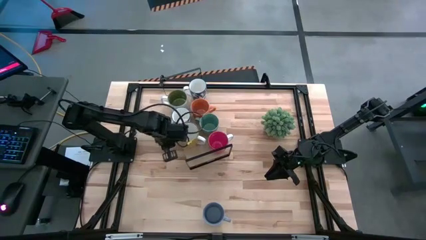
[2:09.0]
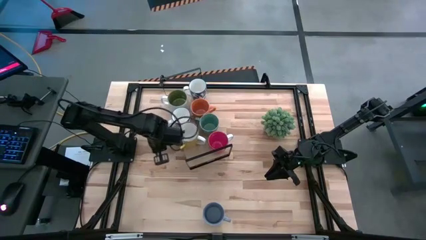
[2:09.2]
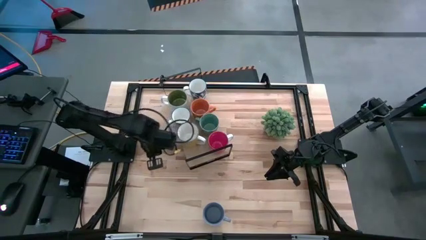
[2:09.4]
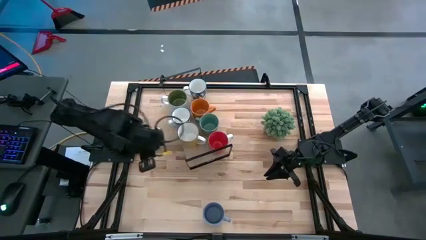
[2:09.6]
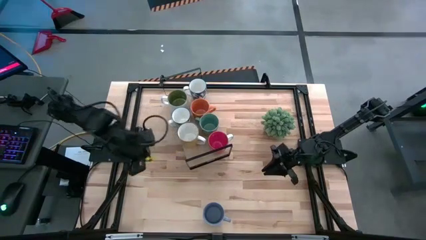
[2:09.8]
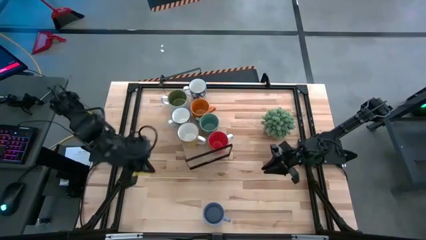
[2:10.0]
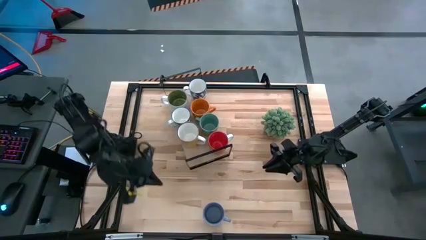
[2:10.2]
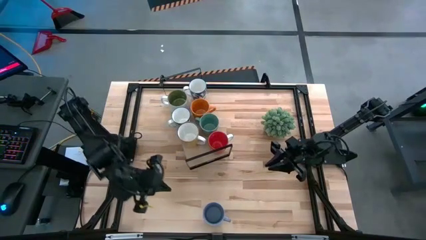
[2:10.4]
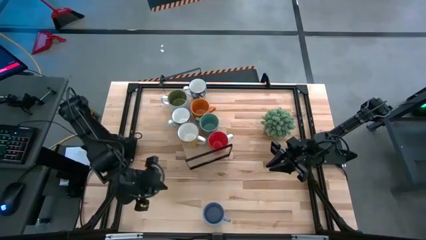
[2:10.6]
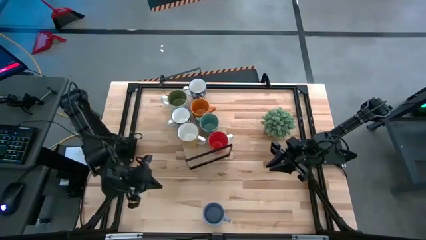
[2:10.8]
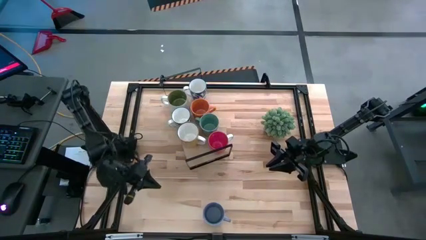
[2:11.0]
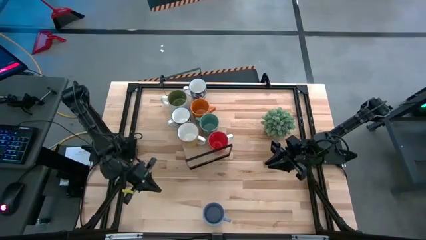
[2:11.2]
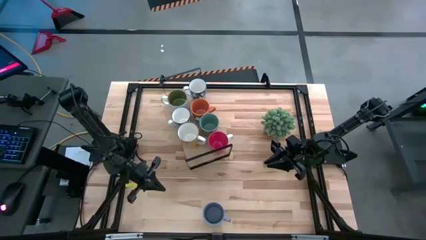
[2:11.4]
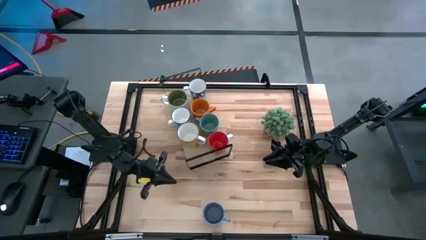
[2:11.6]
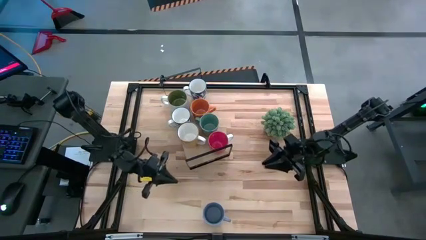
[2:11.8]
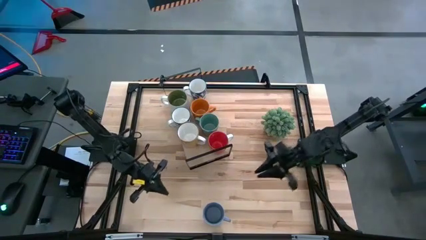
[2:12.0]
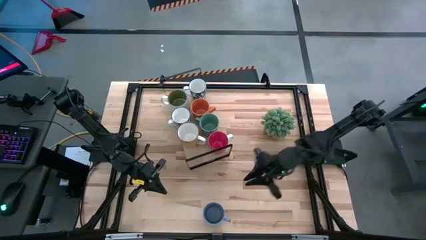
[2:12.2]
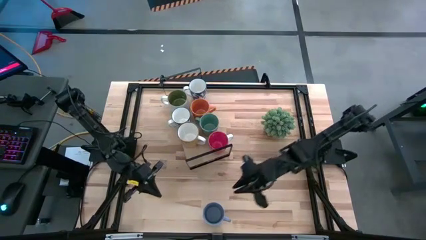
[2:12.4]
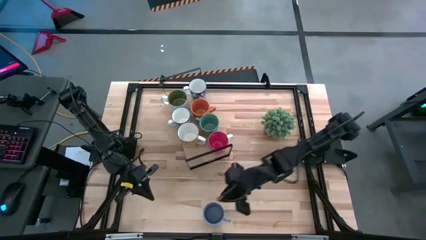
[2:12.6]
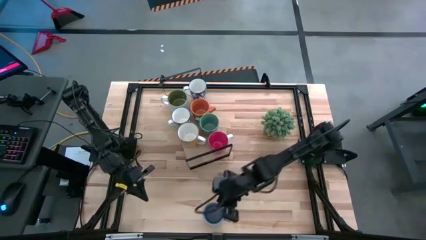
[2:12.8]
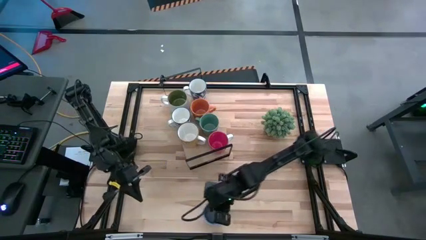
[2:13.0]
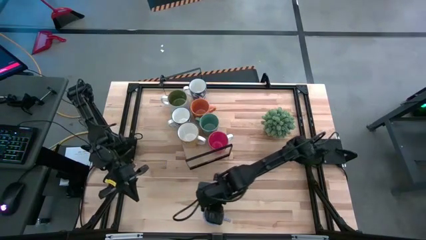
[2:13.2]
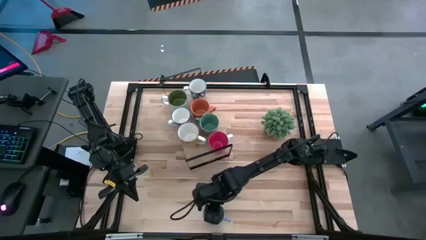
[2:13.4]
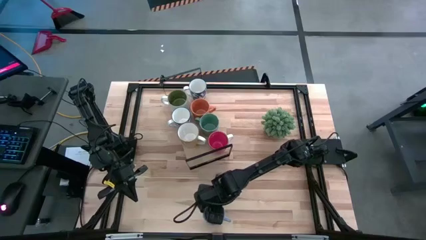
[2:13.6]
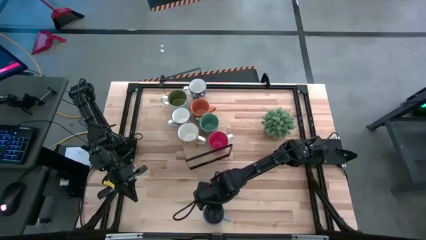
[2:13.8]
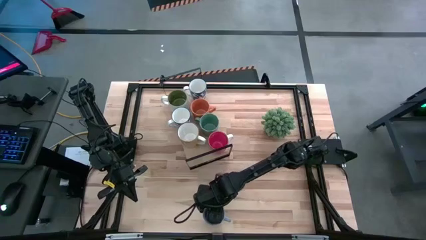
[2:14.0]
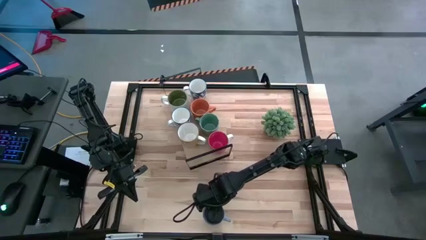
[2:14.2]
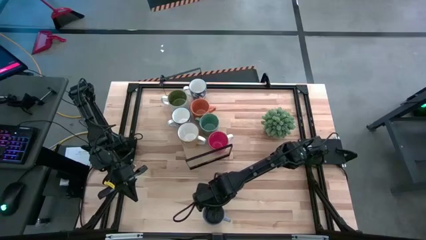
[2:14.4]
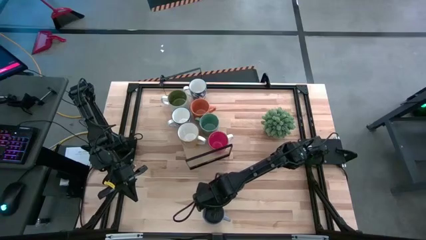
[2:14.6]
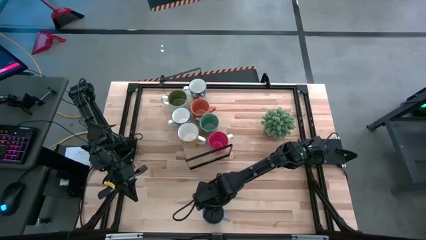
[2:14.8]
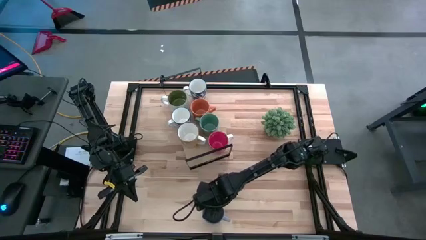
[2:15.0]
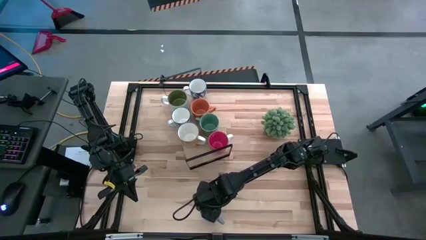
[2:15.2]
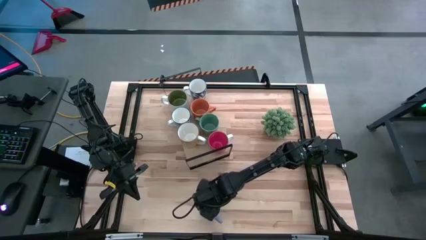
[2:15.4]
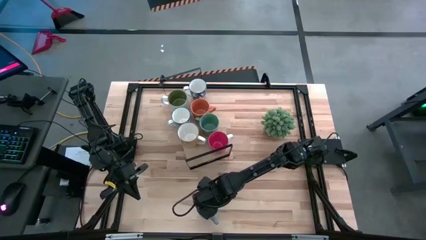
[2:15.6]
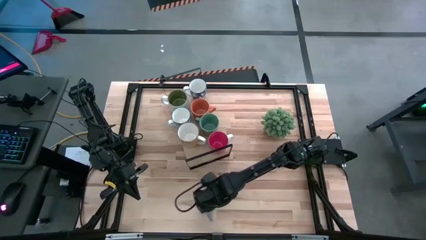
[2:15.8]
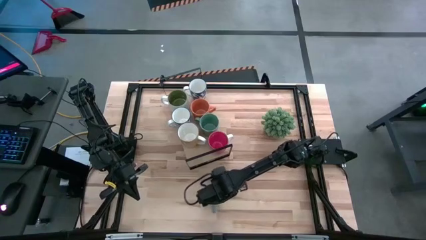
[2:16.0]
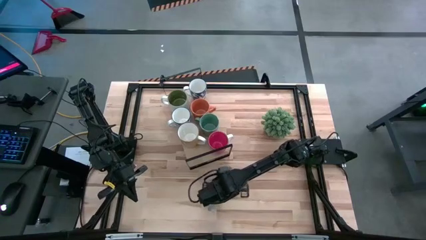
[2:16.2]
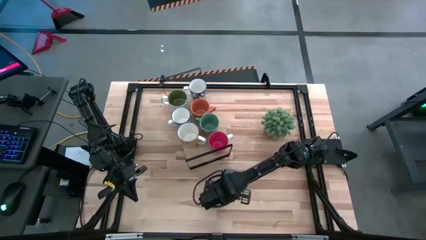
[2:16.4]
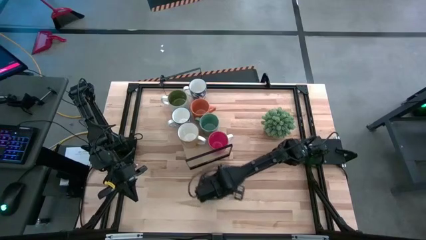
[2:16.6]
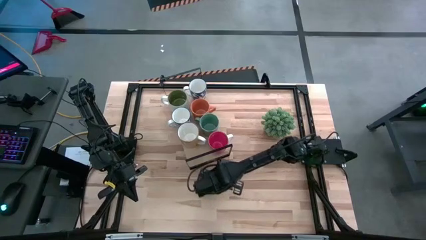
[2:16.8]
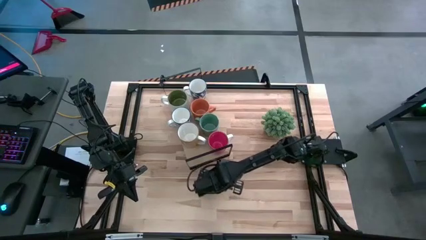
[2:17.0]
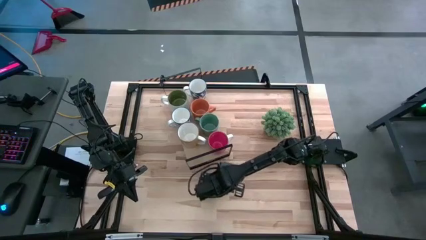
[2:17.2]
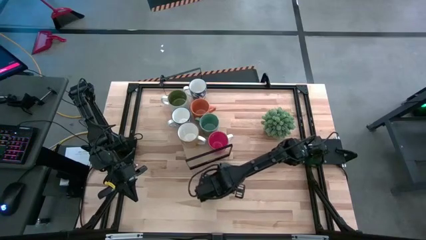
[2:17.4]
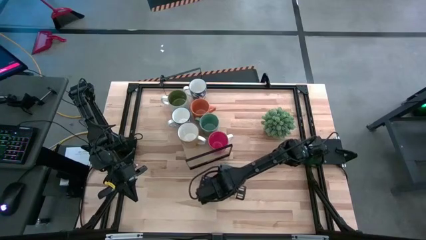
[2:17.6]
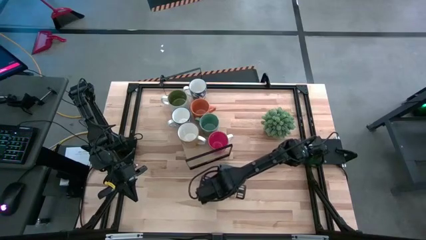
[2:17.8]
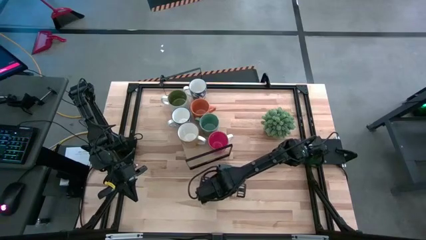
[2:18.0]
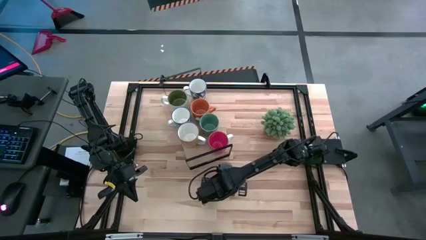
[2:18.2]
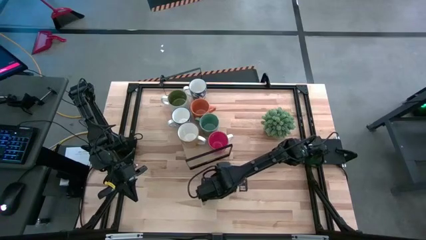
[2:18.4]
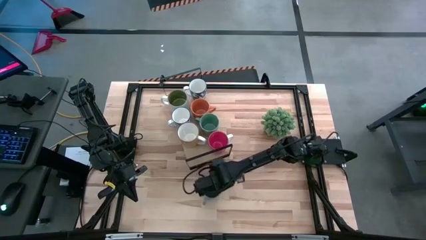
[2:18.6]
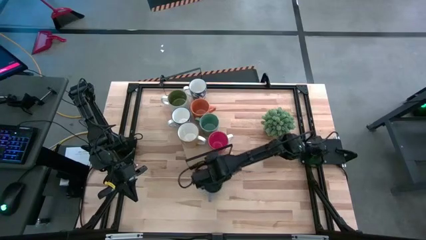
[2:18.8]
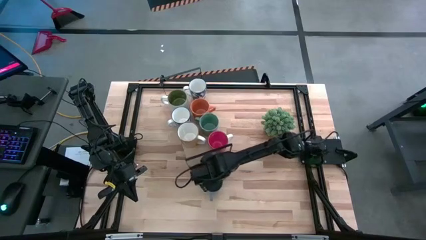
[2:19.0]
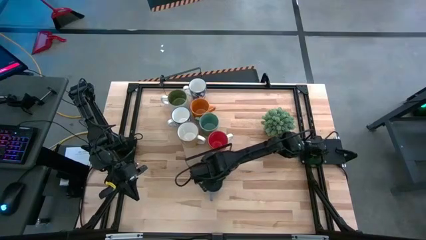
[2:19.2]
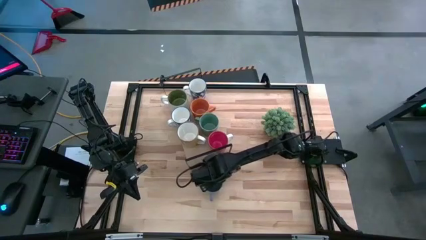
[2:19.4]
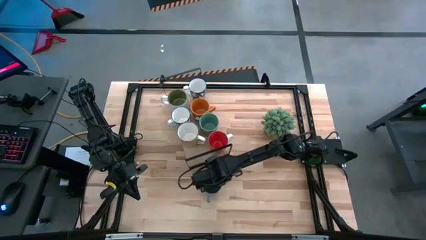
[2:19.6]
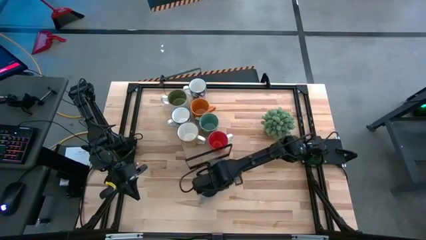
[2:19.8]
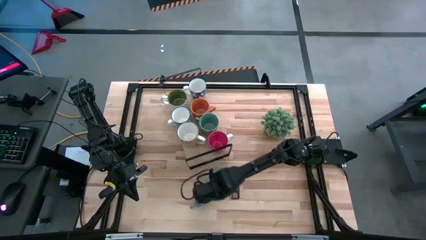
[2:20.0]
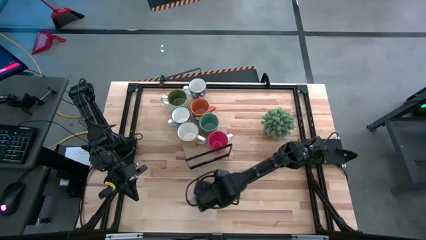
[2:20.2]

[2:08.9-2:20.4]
Task: Place coffee mugs
Put the blue mug on the shelf
